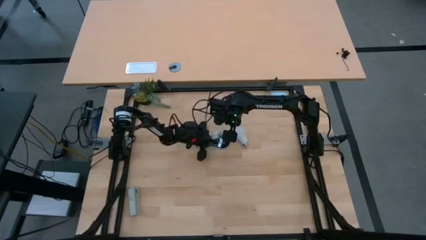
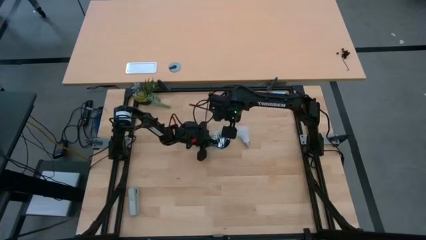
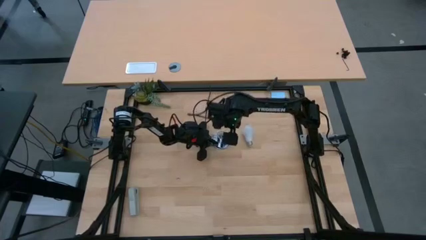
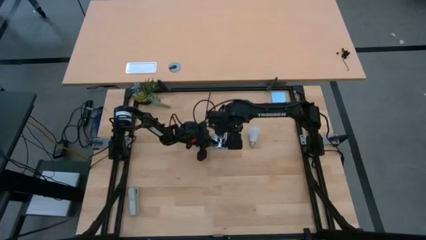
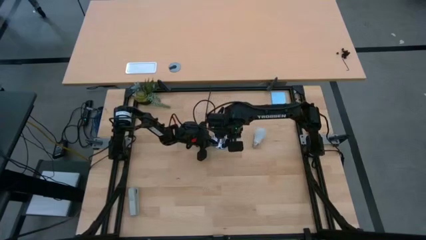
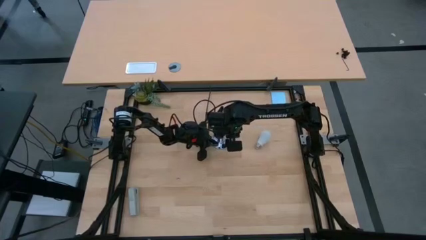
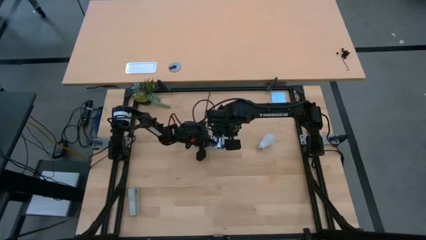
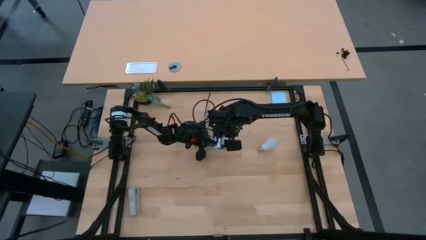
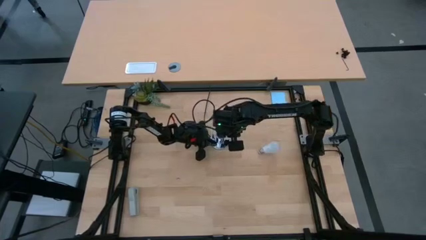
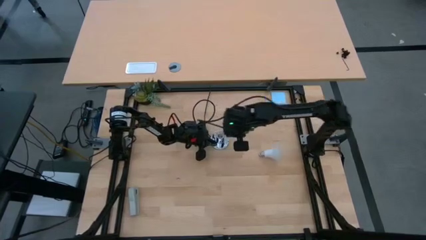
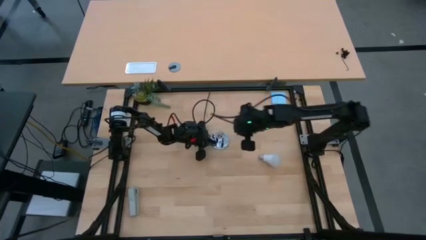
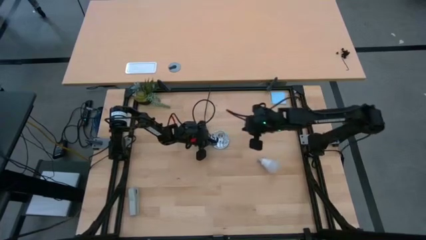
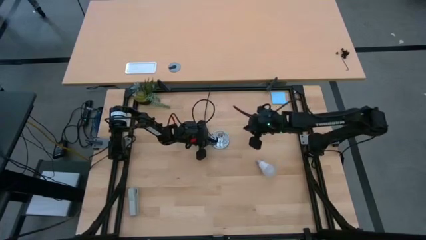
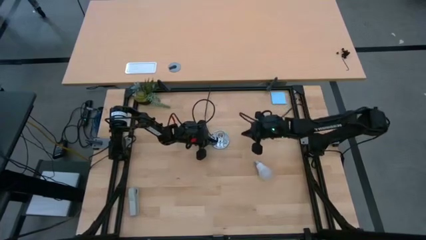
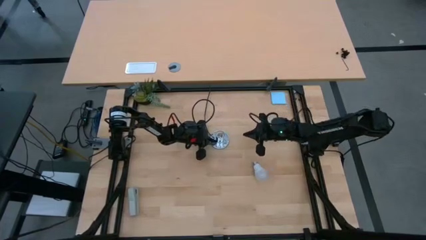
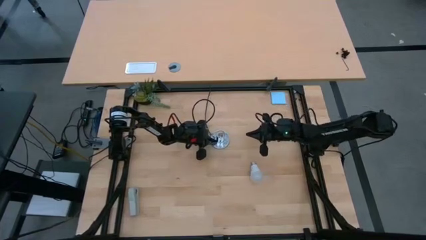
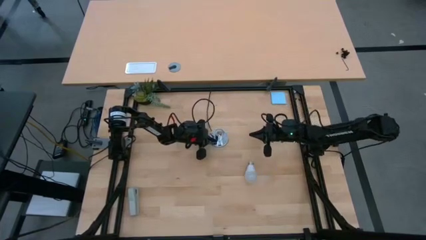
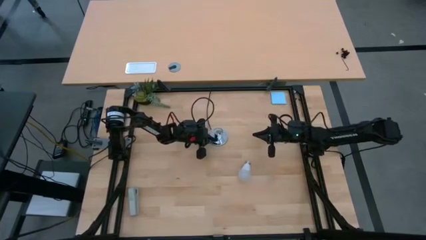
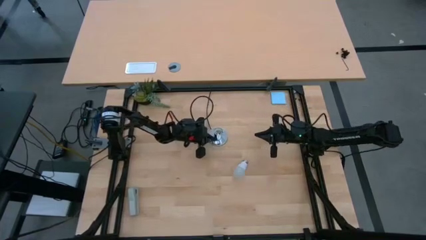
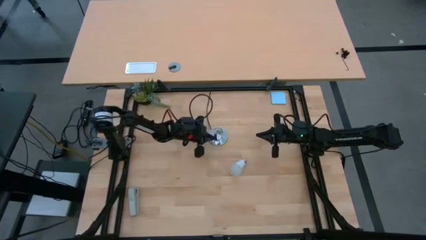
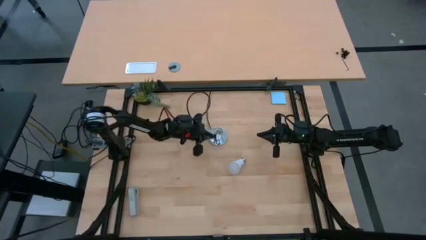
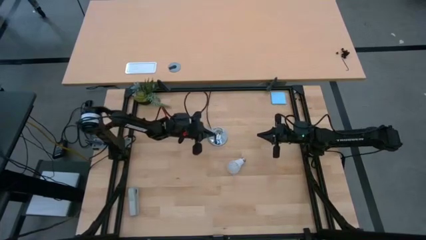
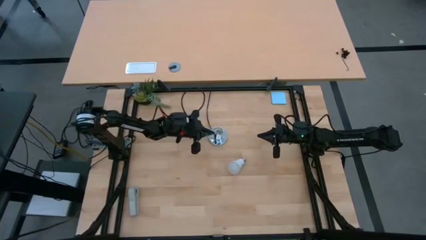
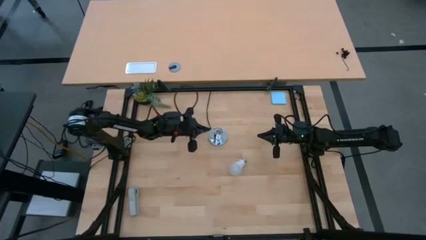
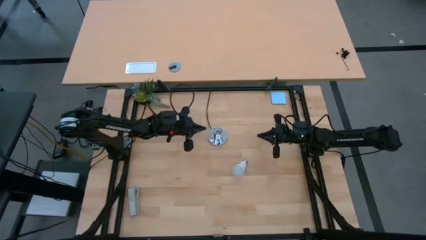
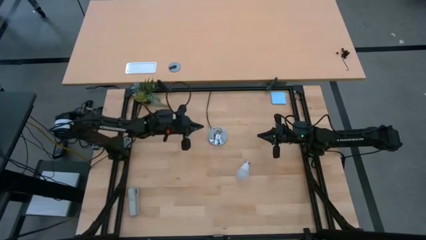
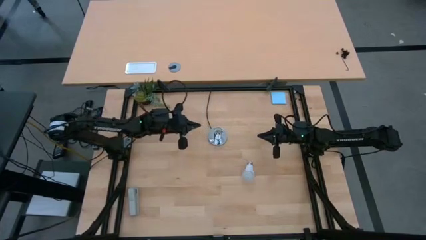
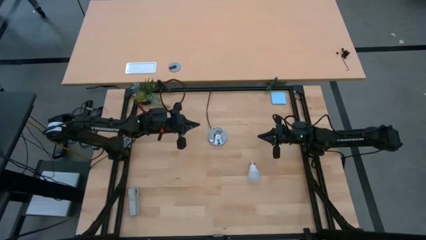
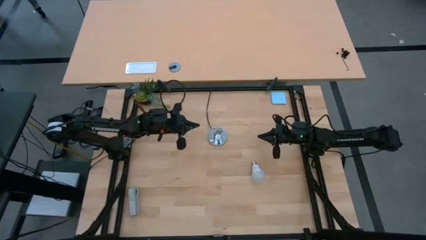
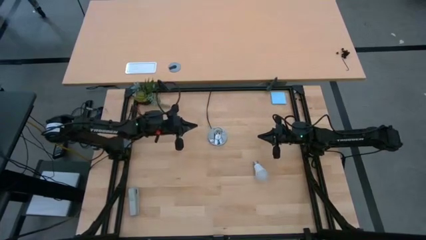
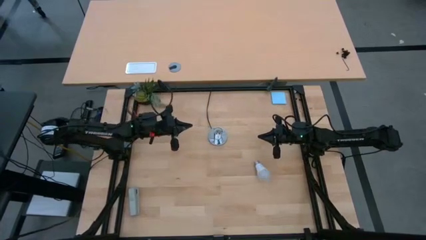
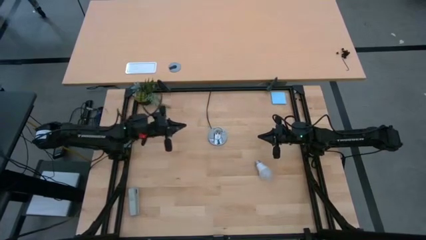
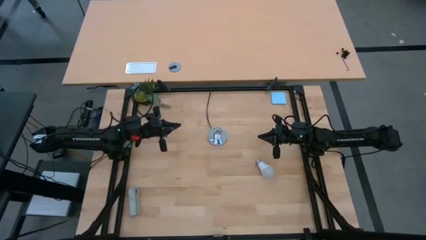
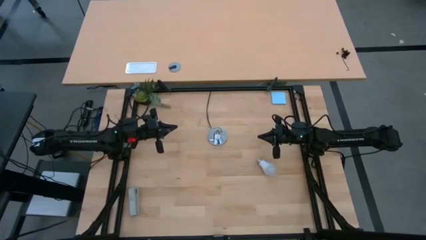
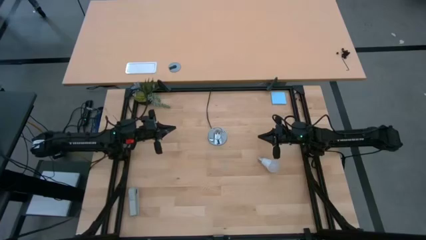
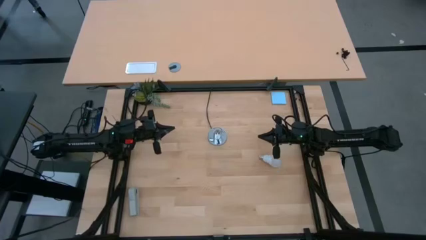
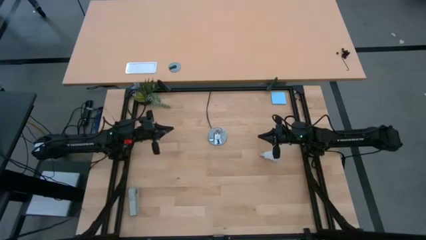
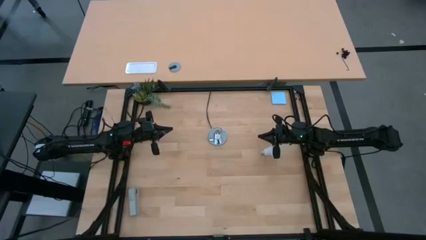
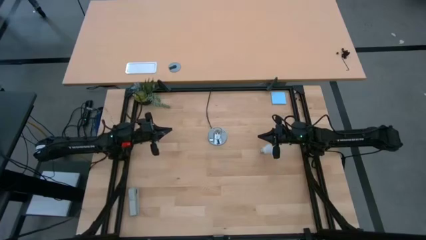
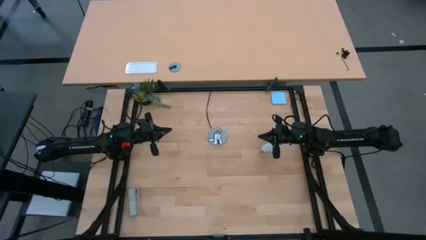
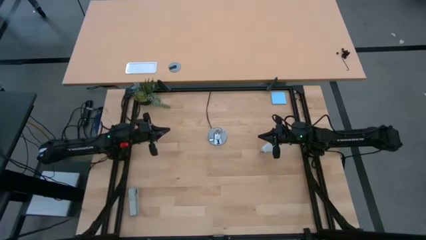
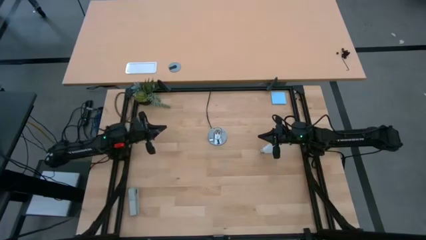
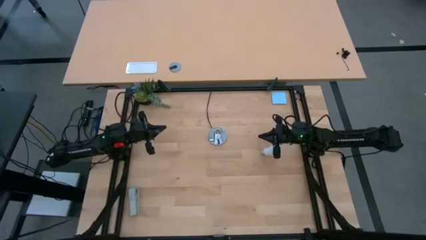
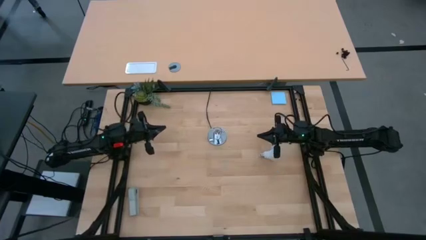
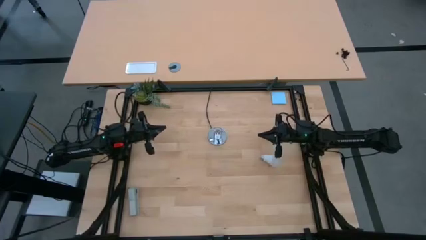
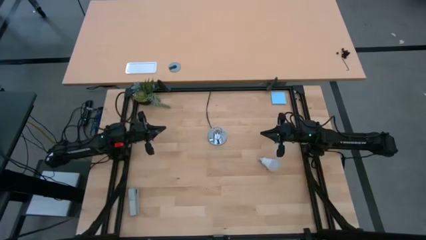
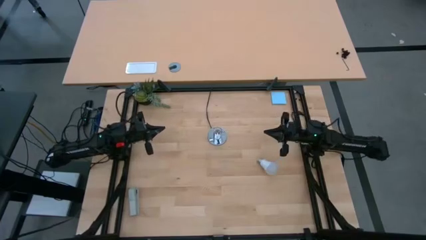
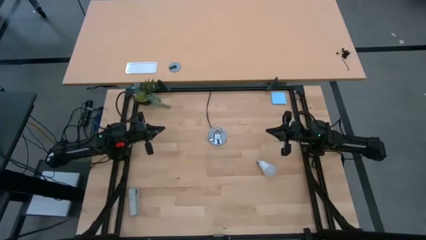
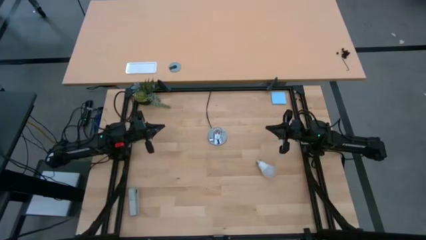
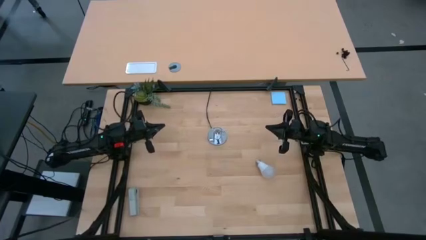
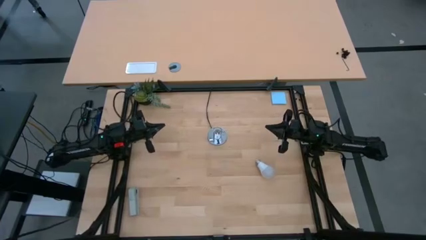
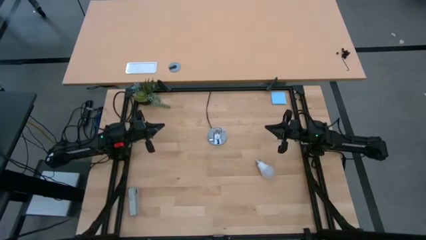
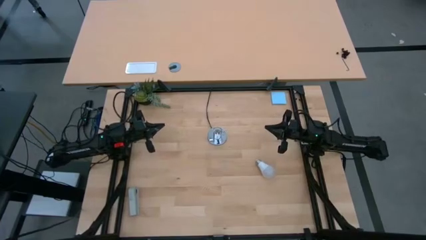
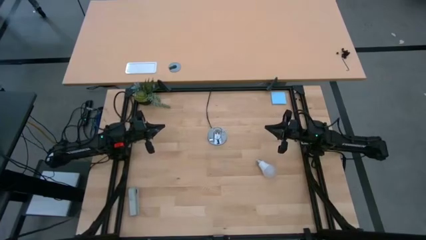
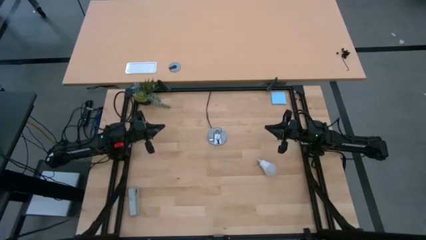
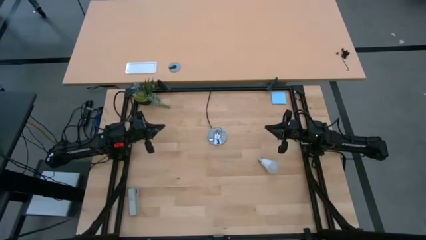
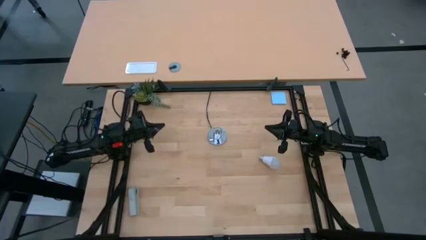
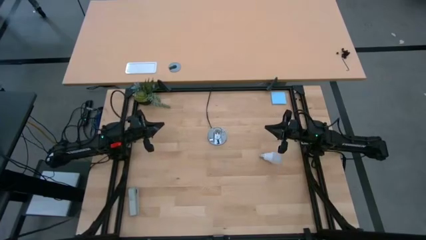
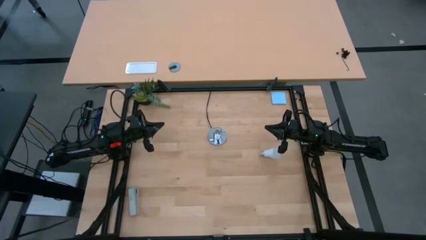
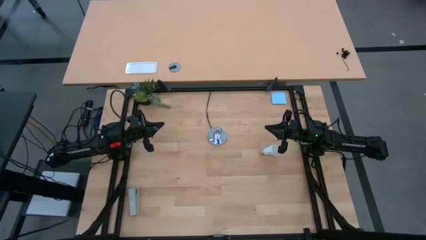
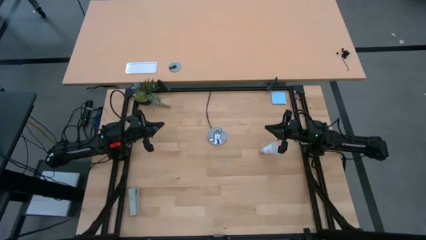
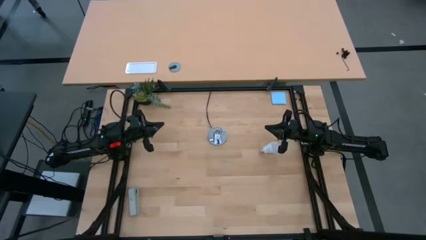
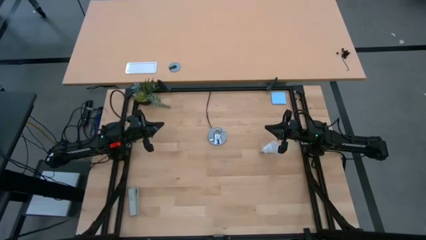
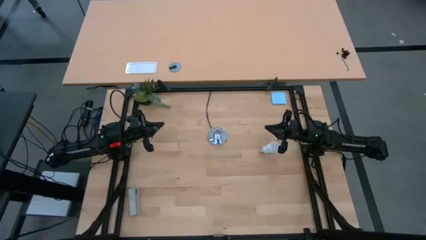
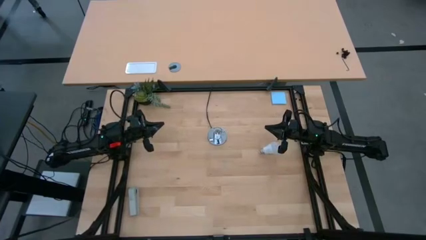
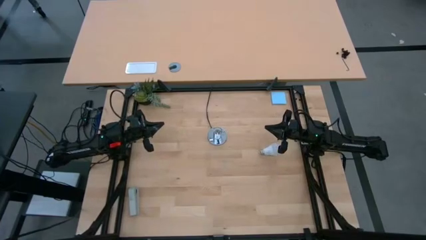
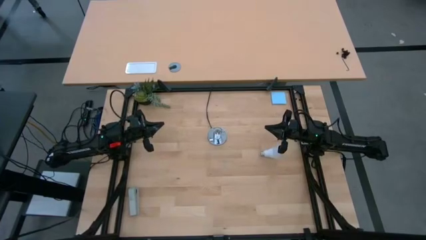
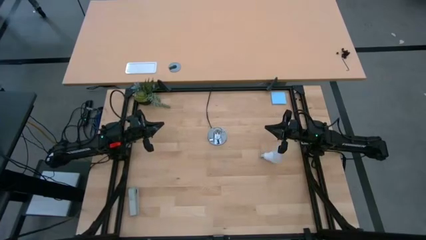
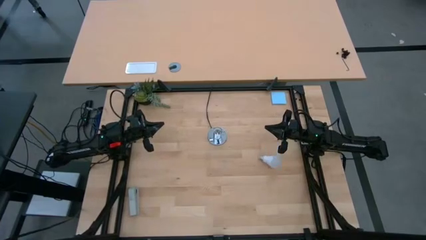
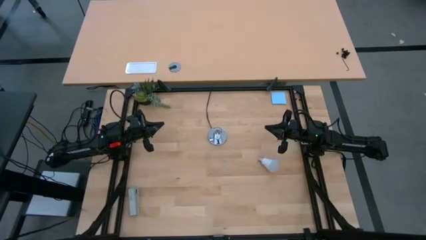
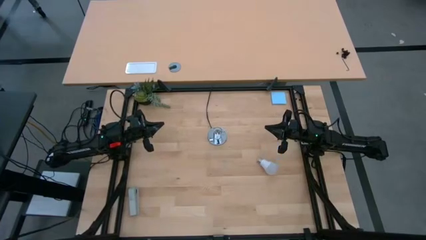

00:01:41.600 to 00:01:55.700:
Task: Screw lightbulb
Return to Home Position
